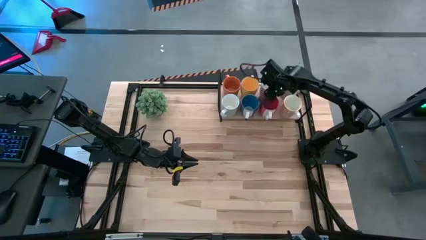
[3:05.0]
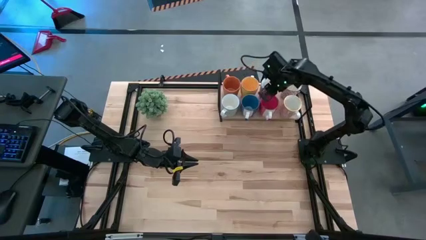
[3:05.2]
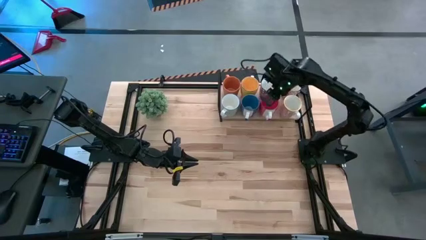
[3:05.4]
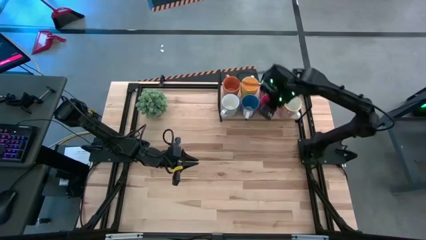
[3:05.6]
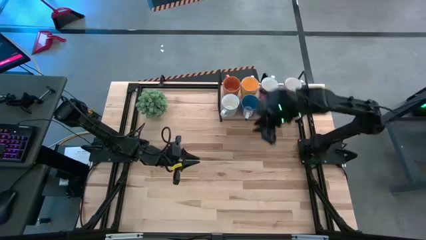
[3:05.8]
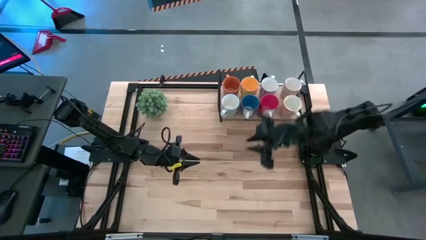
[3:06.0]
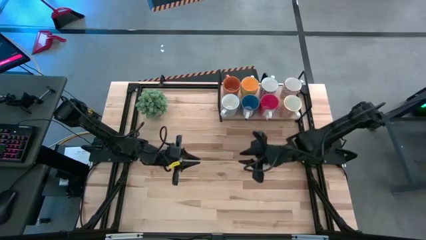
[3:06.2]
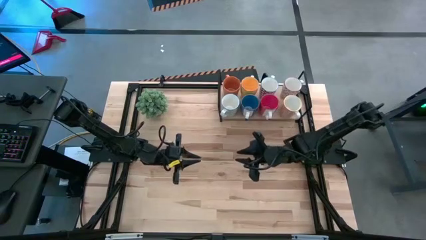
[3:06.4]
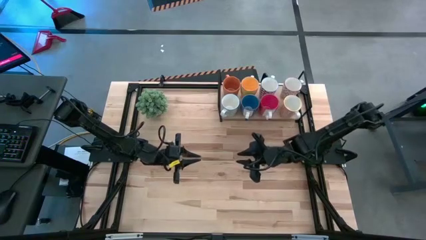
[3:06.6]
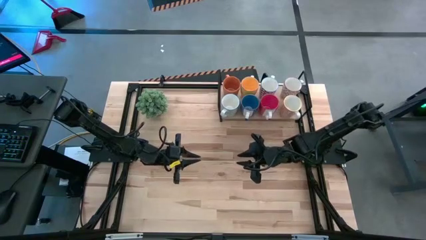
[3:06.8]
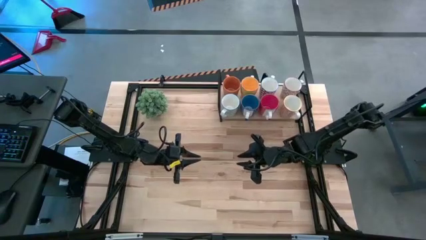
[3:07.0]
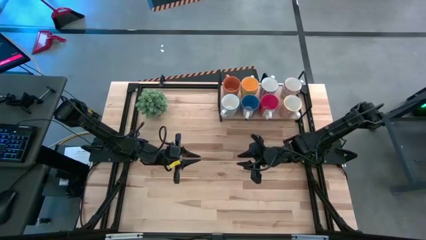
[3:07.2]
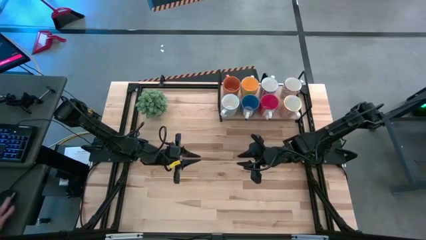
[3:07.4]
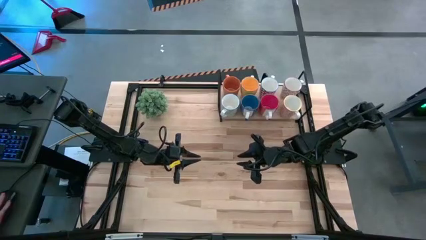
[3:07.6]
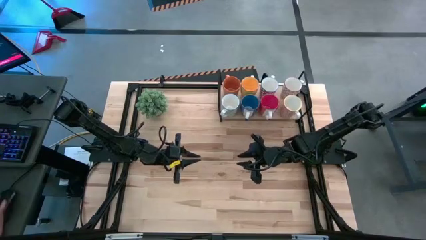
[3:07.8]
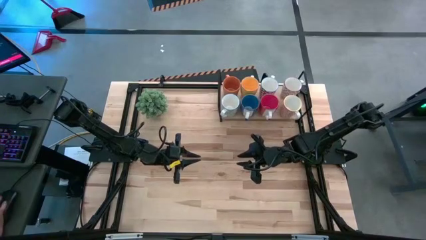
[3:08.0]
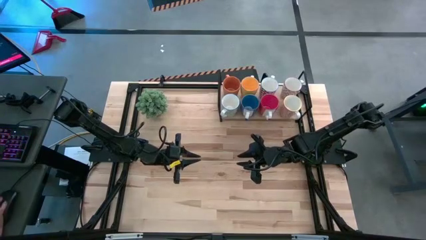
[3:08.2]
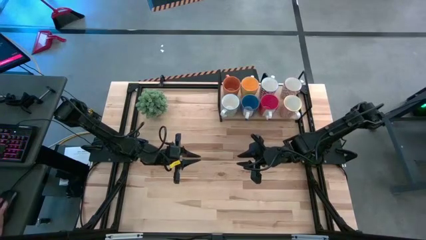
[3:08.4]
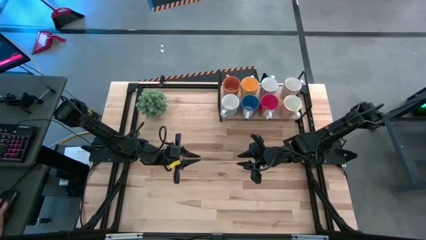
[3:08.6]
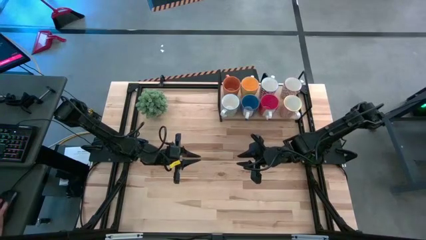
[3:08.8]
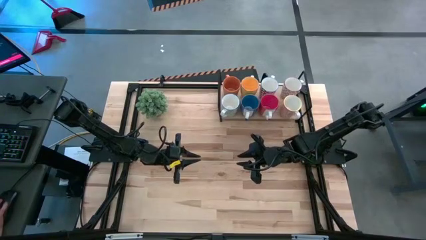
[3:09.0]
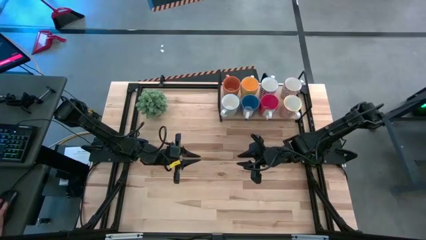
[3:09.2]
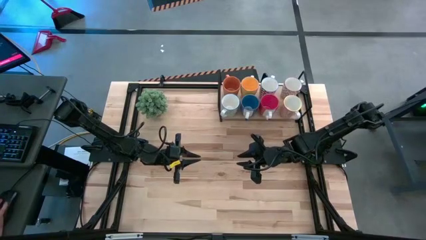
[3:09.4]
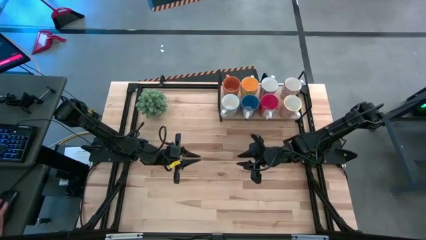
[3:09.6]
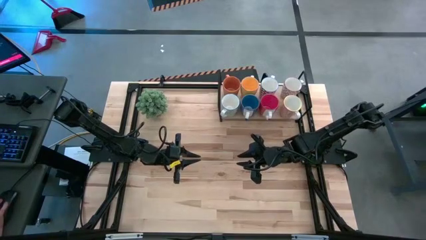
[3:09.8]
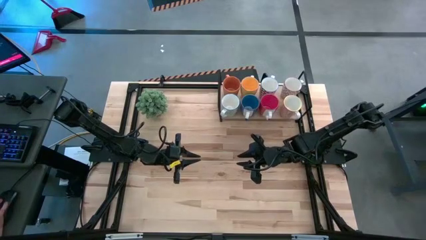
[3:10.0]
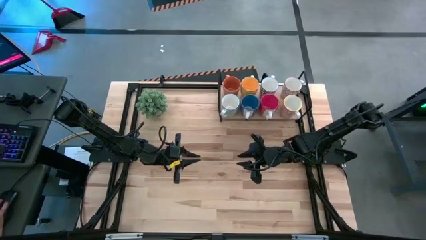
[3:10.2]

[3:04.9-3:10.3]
Task: Place coffee mugs
Return to Home Position

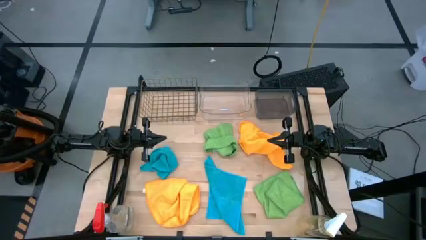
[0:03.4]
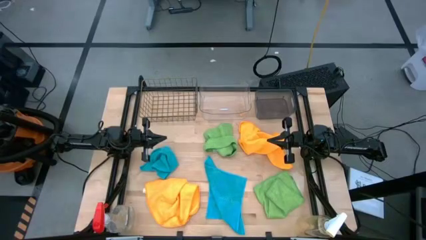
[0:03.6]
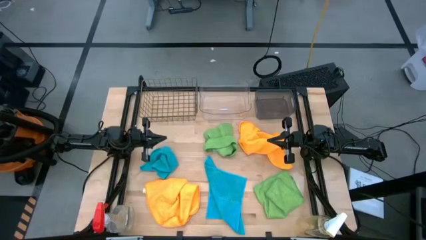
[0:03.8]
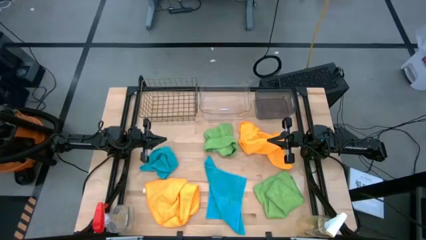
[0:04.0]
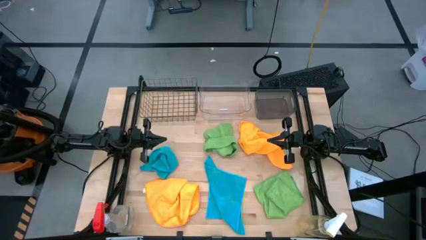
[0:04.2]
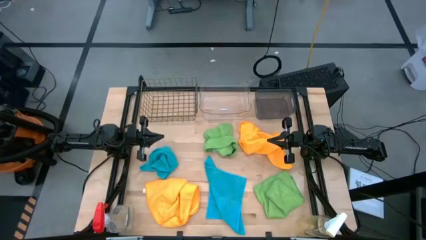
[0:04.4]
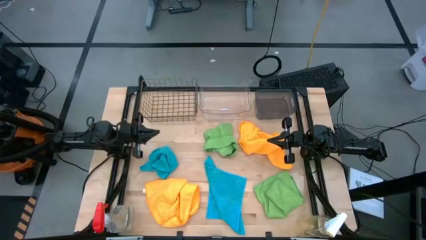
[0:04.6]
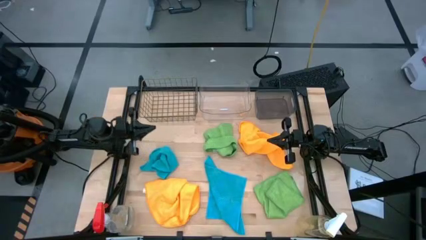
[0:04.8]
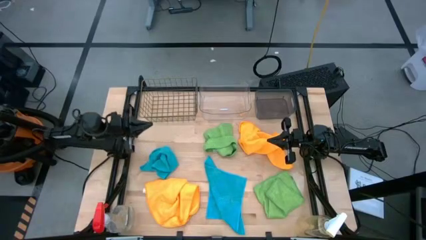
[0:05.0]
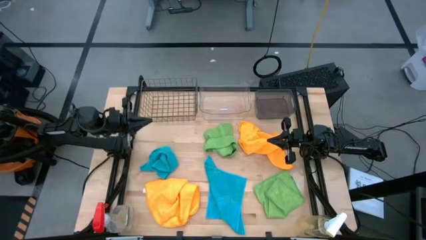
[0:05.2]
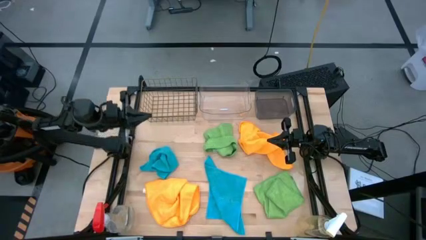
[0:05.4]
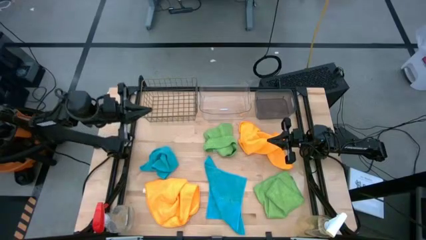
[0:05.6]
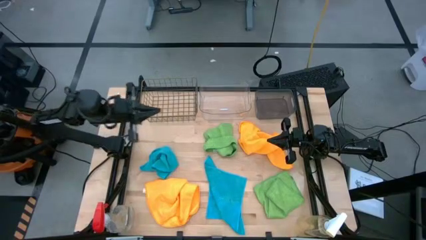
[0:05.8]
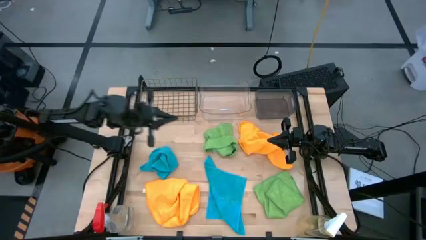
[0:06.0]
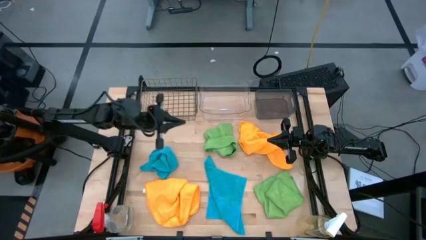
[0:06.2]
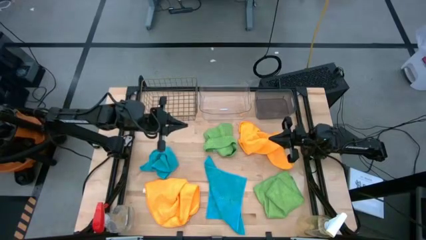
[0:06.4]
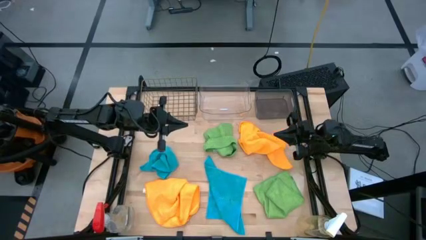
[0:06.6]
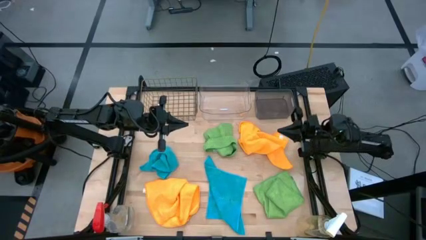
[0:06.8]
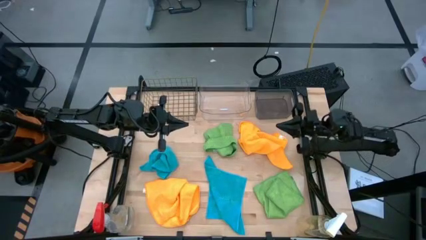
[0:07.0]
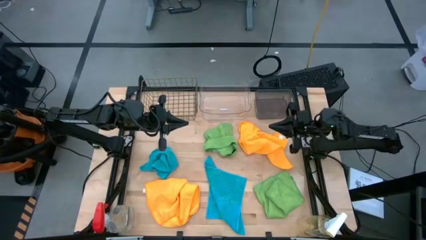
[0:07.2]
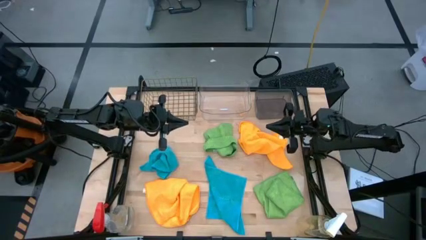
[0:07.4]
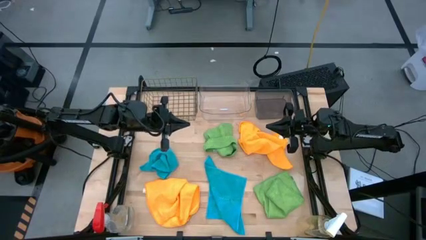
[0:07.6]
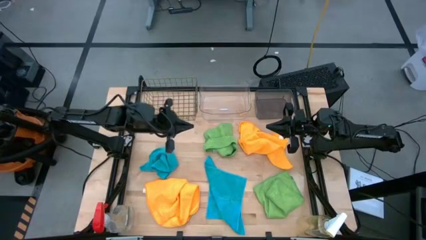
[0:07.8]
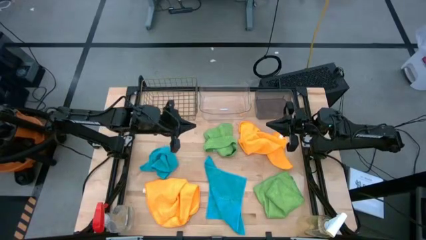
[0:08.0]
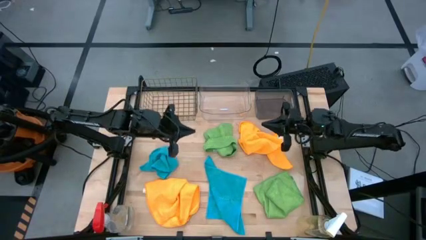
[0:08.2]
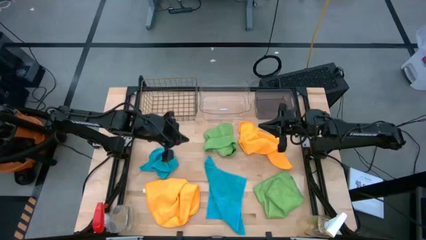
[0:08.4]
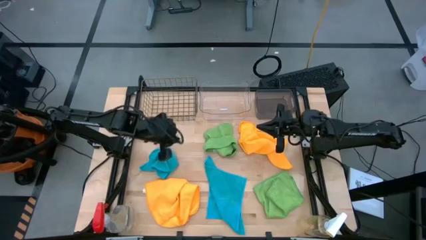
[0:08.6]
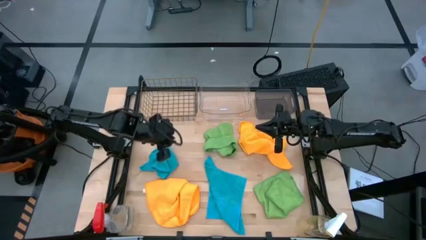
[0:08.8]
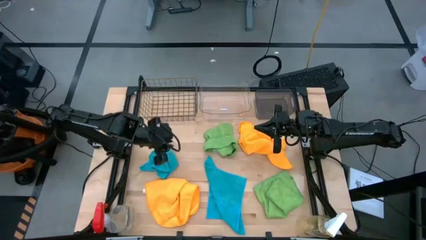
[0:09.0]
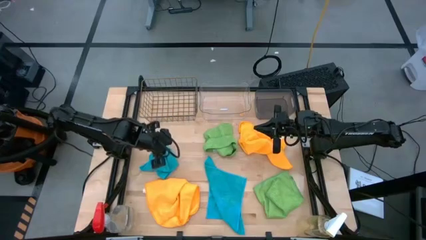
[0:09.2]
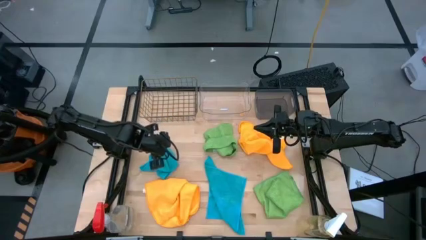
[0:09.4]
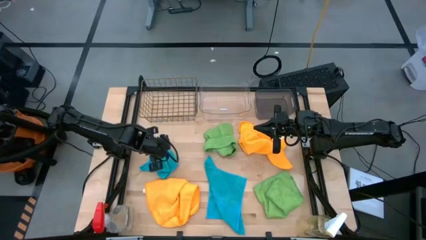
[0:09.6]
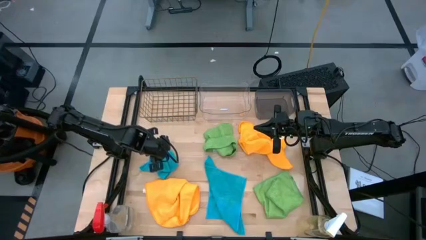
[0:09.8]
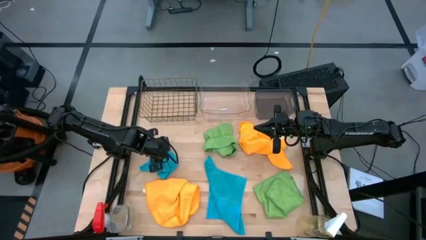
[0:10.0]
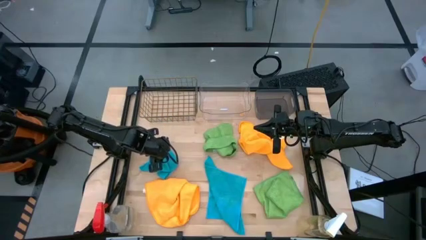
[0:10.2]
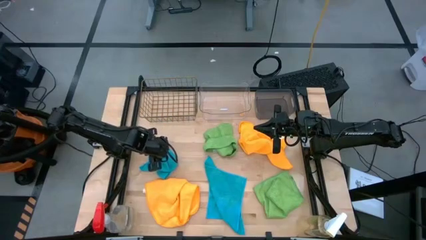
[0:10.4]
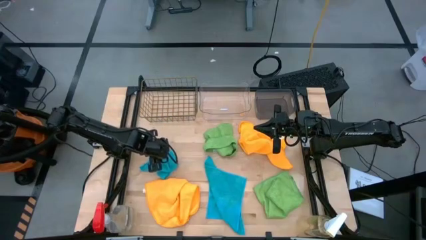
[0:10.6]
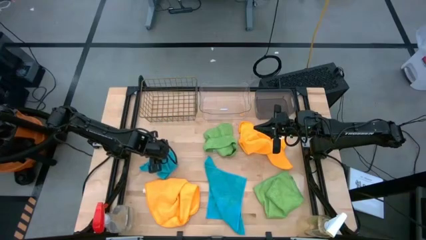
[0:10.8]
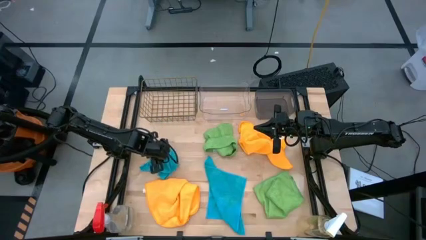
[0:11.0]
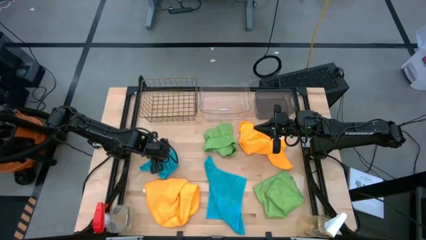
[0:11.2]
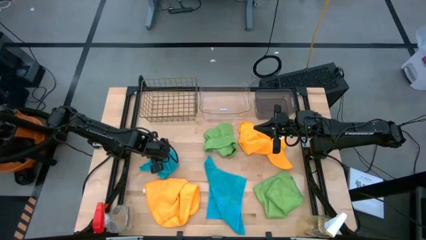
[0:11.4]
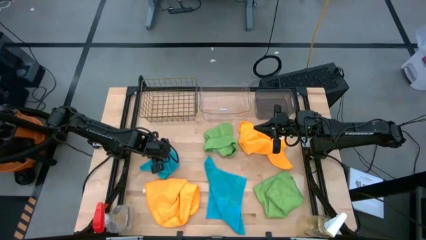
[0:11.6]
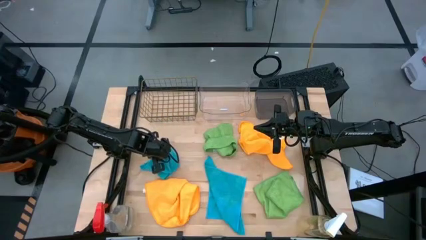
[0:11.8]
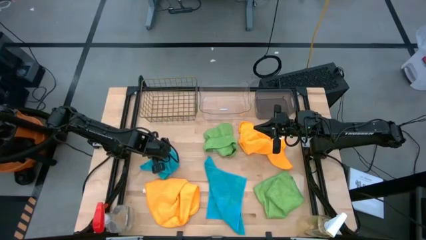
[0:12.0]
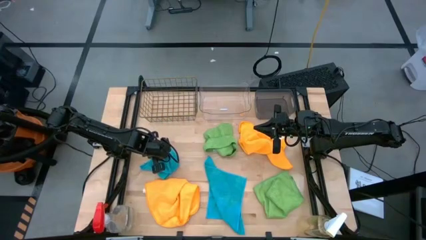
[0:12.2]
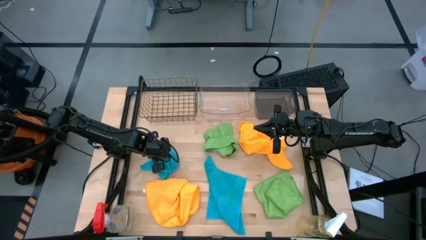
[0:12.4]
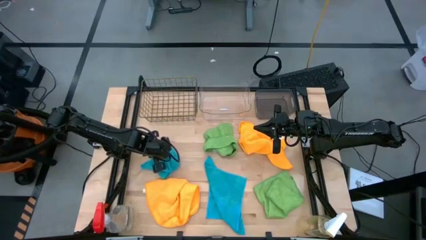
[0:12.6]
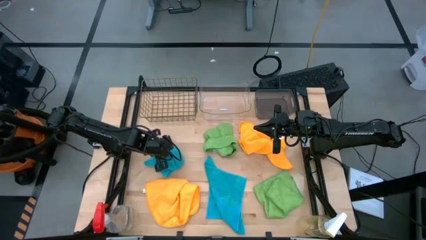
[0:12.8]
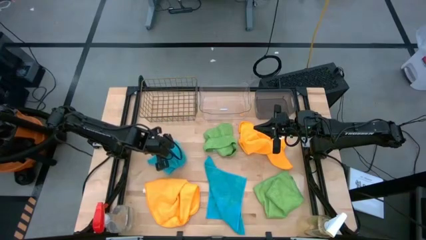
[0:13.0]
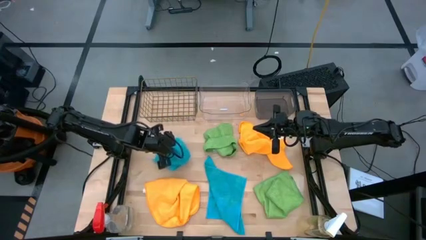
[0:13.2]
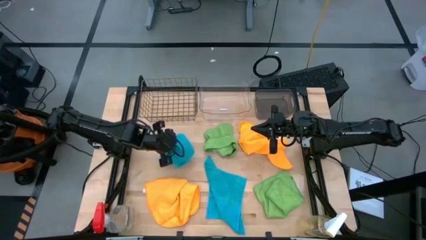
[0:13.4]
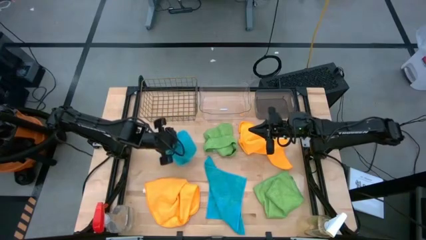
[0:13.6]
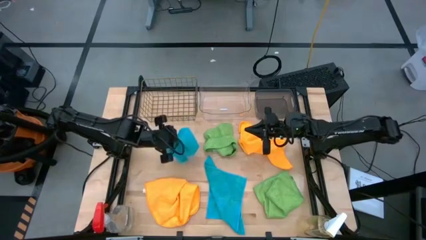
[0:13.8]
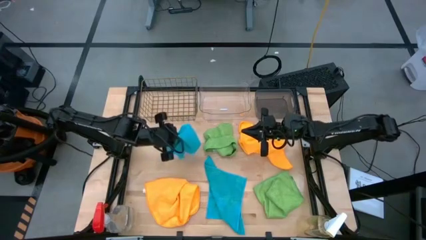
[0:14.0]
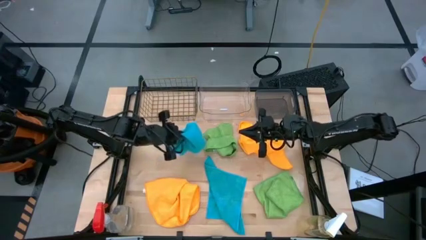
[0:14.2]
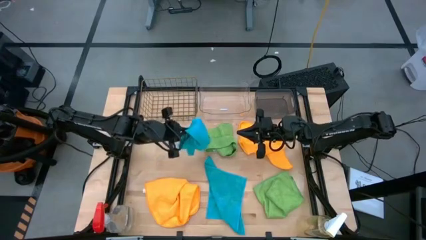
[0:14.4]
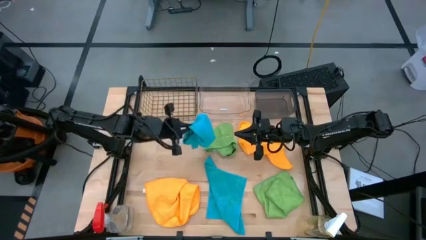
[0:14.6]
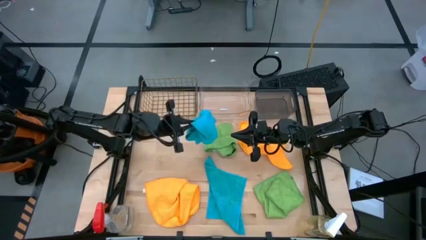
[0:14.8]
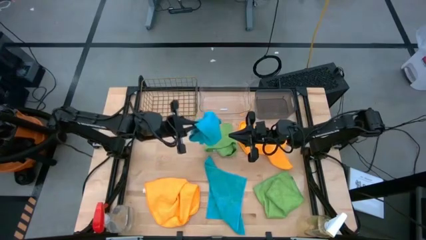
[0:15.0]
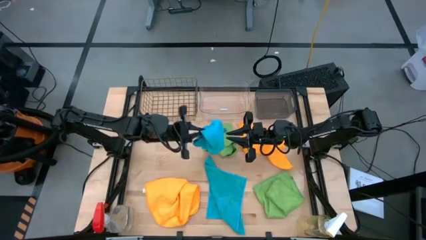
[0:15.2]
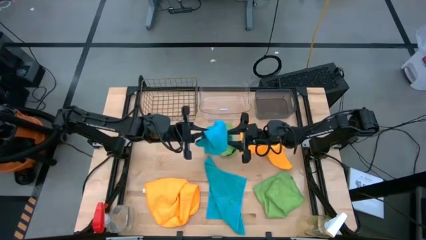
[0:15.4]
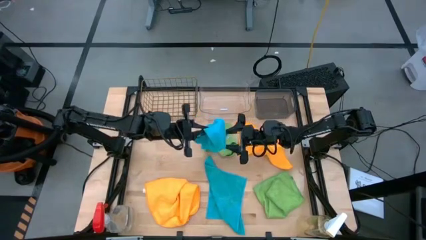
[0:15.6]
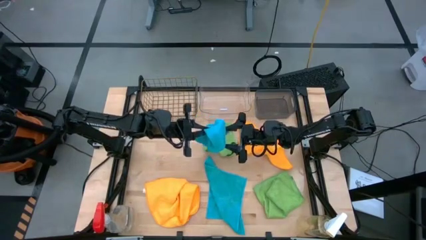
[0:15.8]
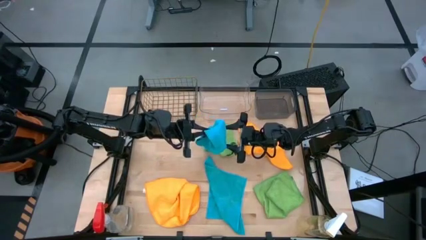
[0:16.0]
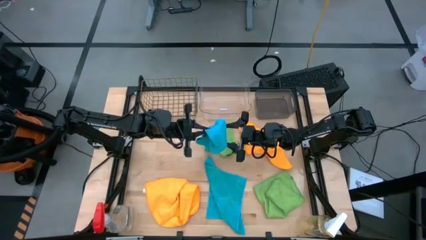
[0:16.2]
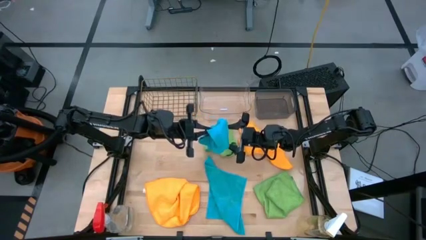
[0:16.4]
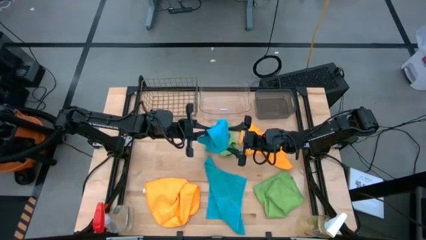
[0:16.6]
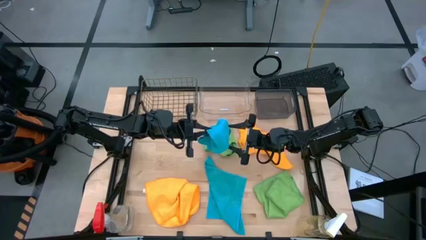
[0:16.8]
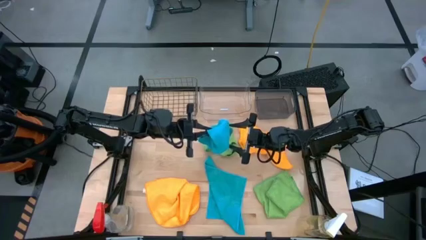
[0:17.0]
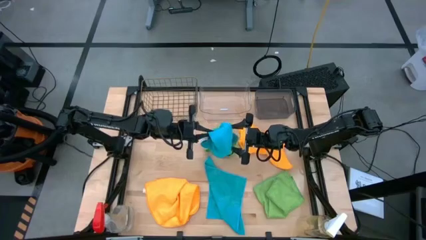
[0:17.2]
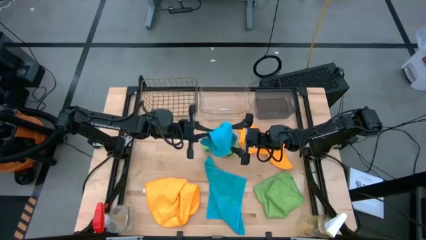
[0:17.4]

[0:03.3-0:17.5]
Task: Sort microfiber towel by color & place in baskets
Put the left blue microfiber towel into the black bin
